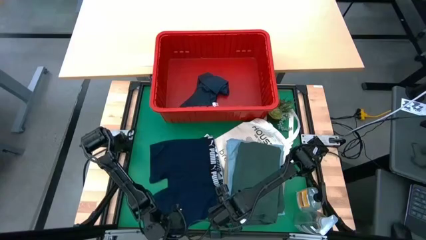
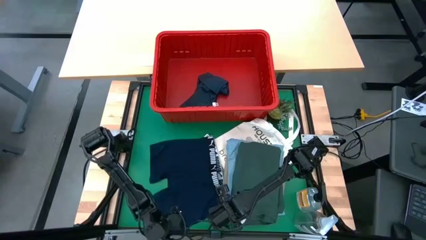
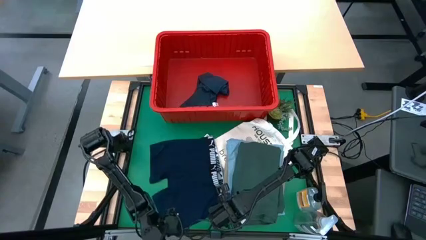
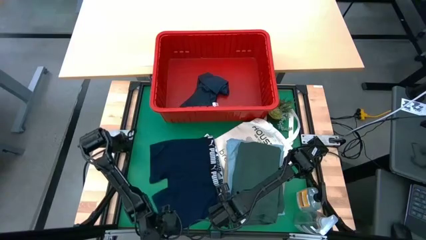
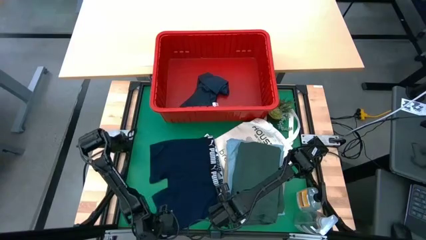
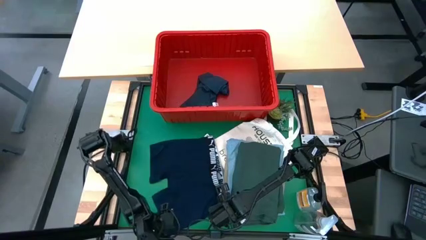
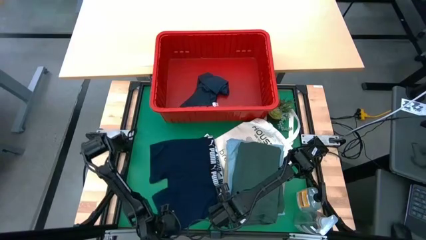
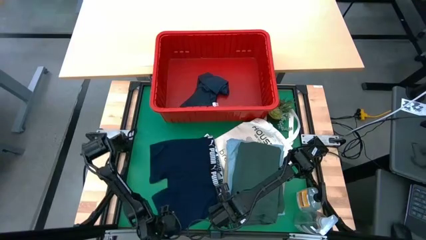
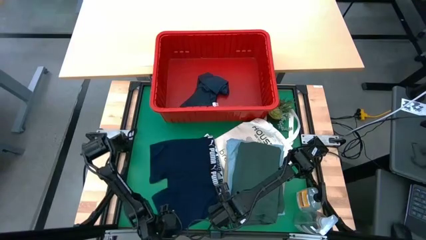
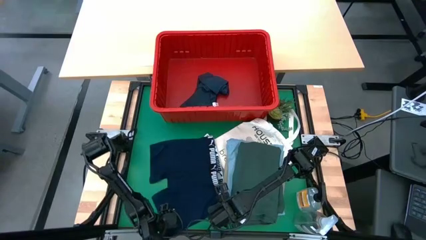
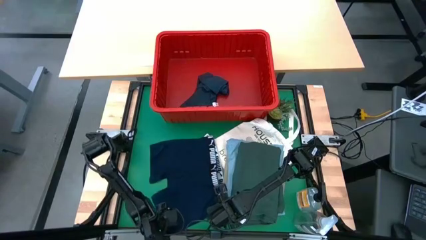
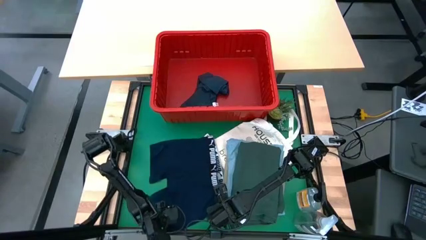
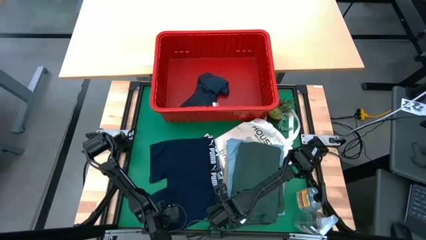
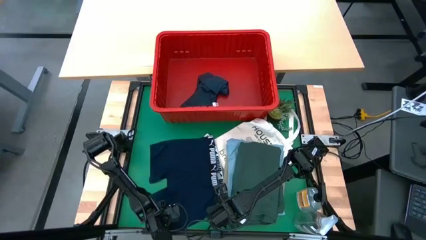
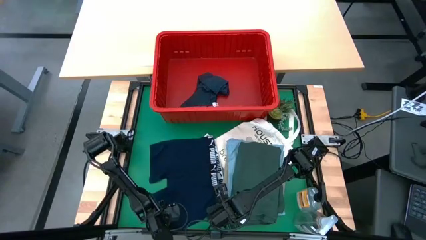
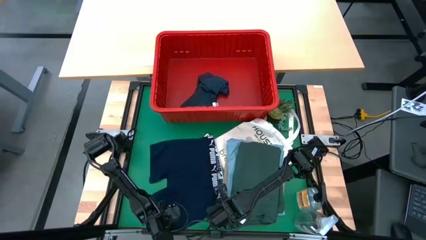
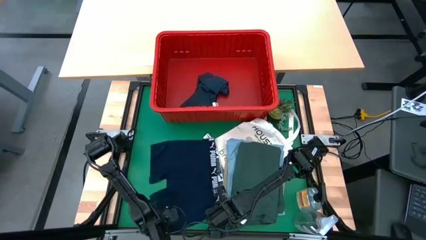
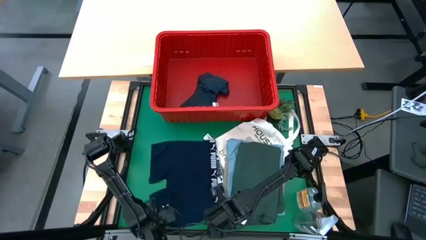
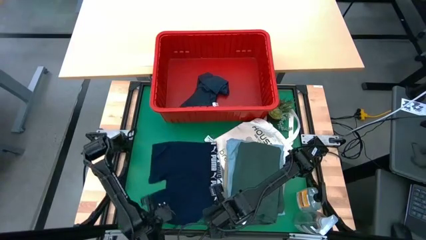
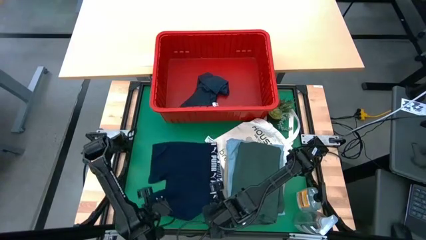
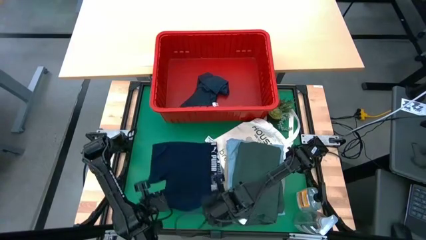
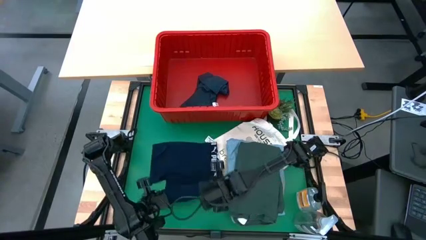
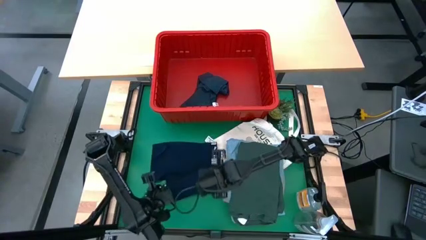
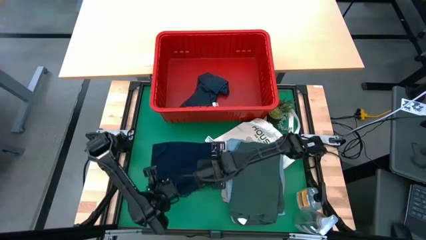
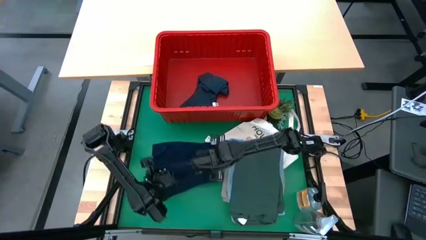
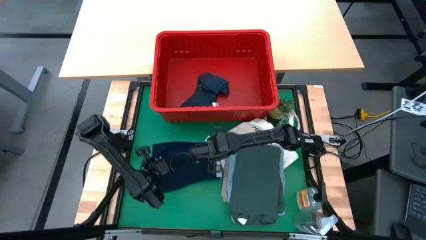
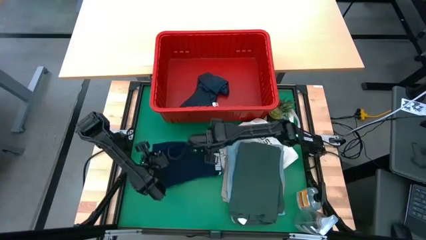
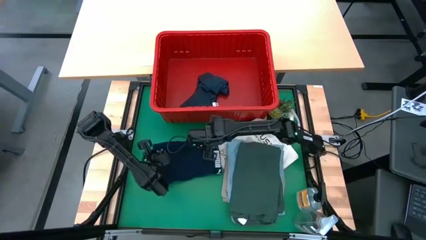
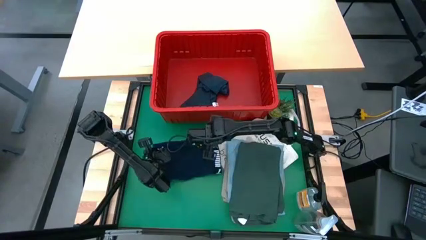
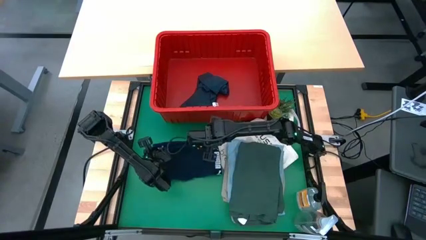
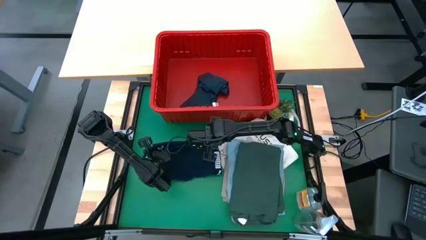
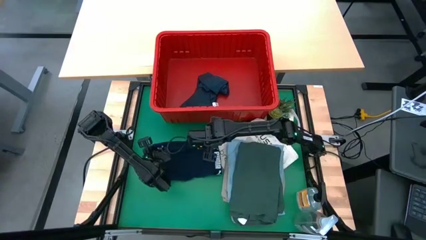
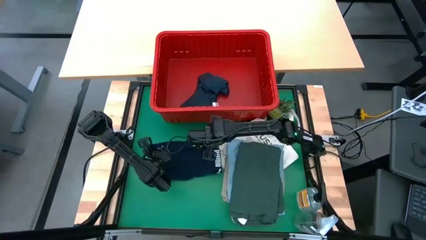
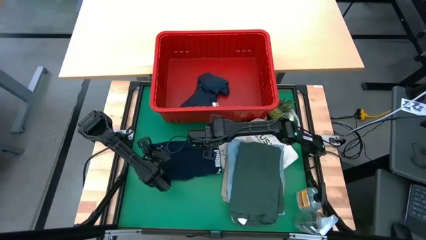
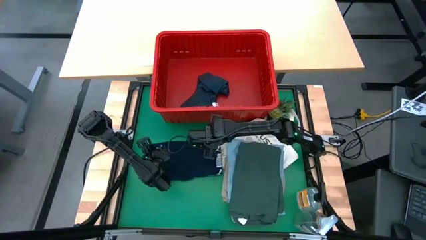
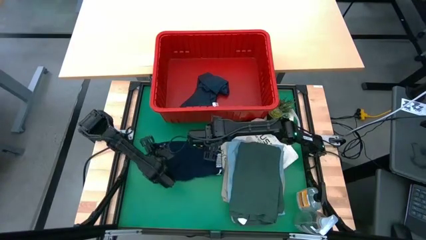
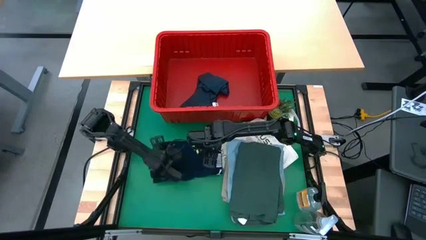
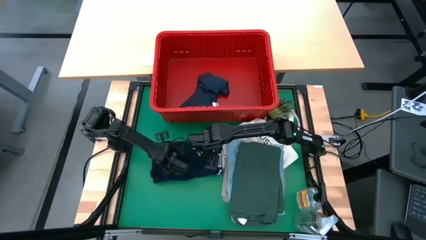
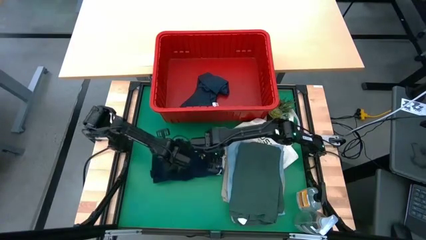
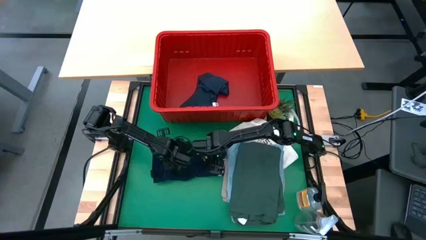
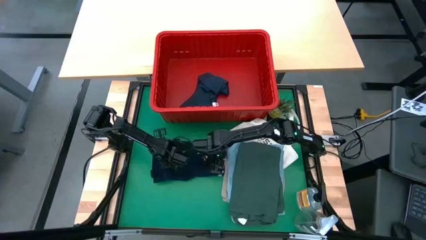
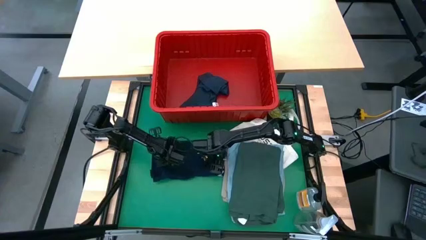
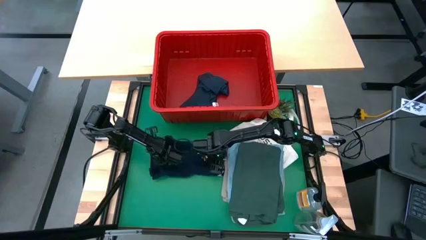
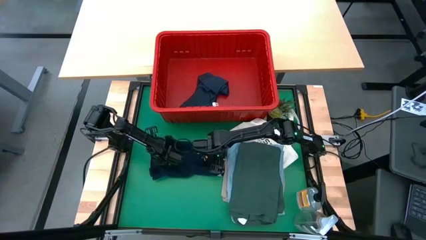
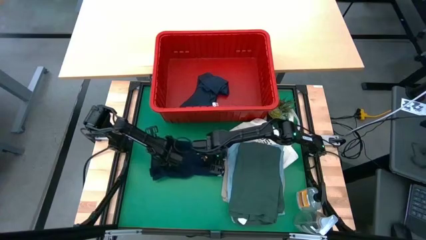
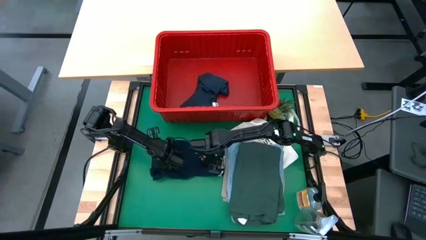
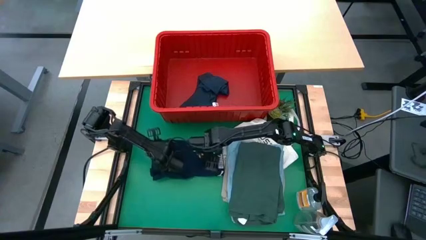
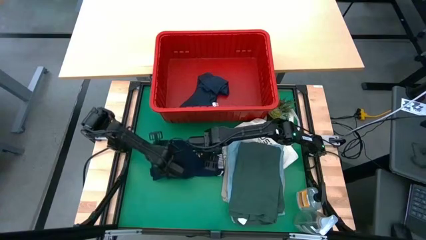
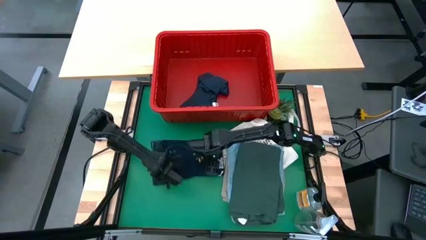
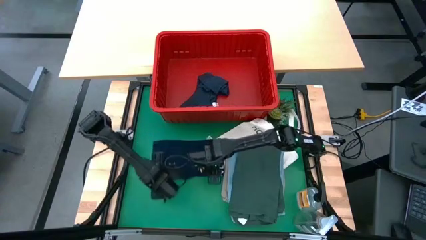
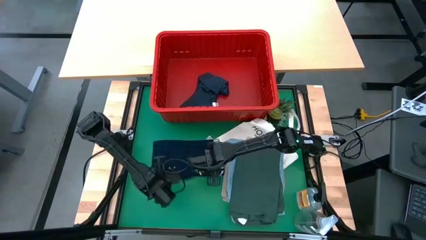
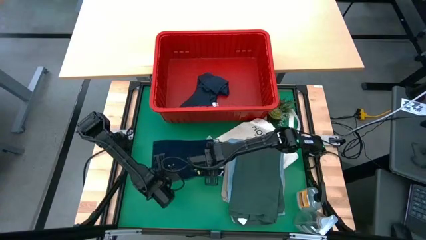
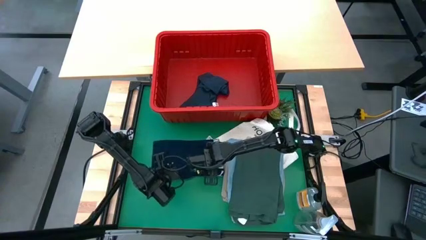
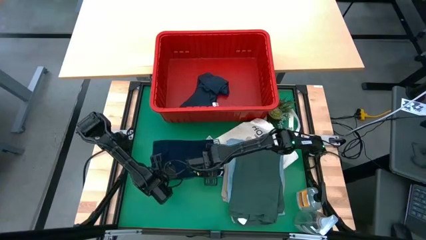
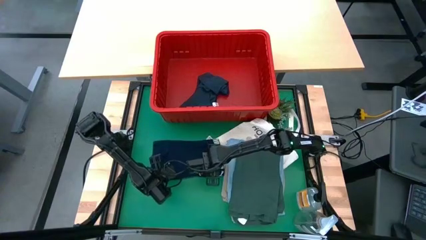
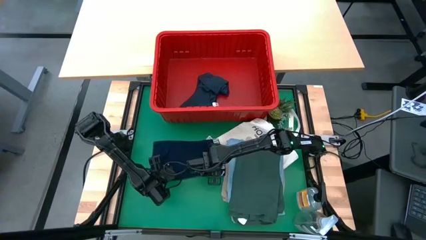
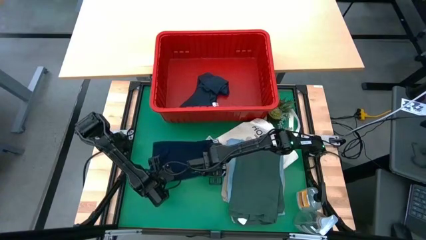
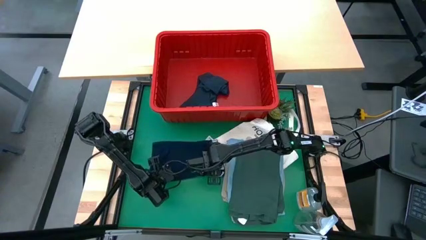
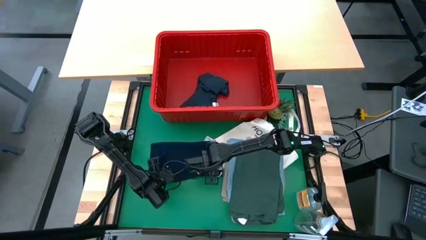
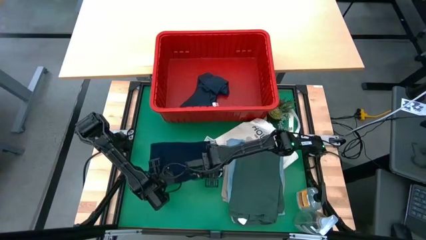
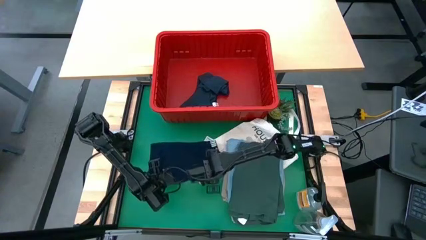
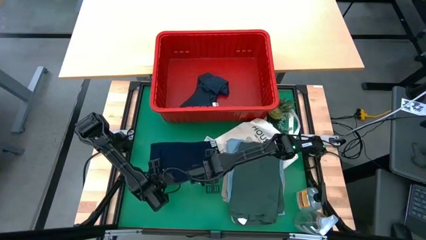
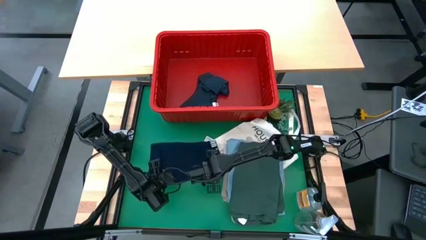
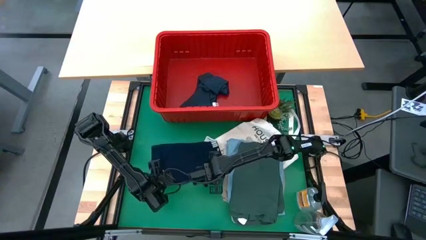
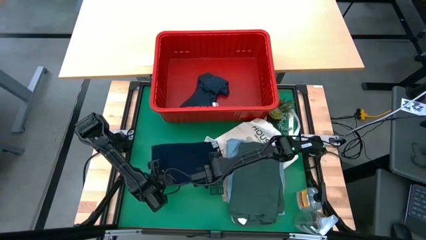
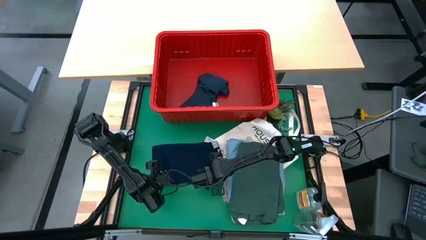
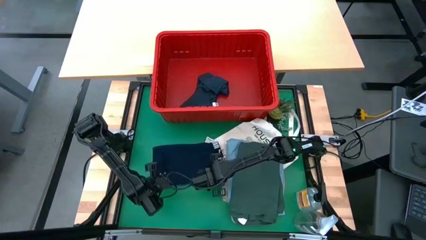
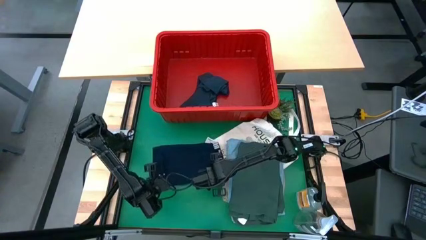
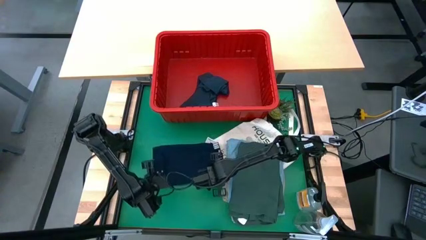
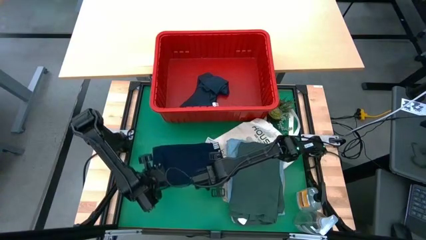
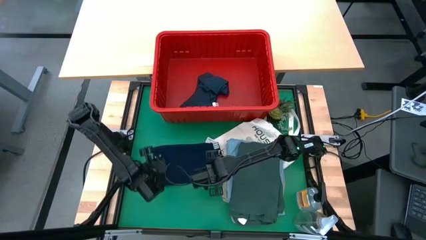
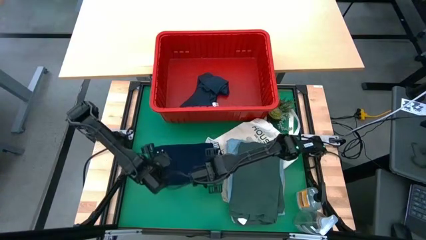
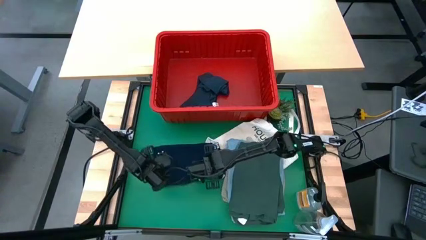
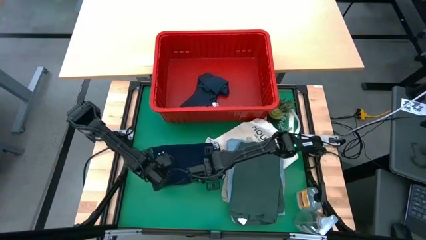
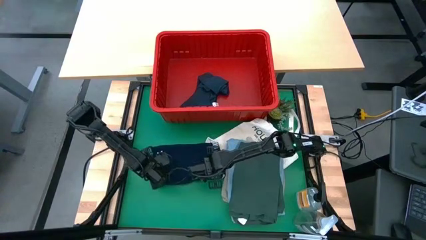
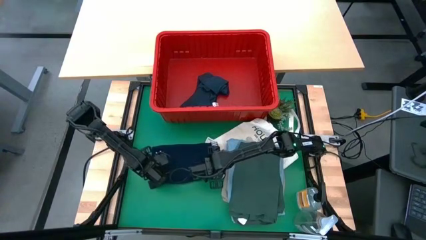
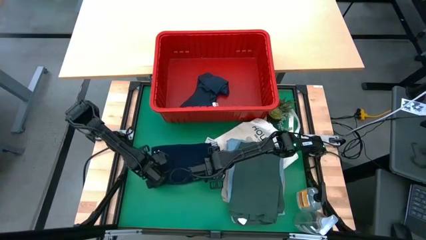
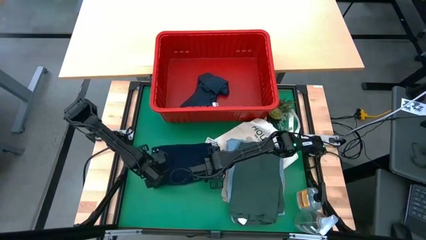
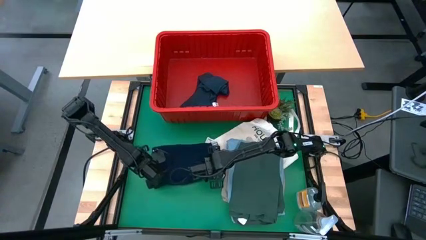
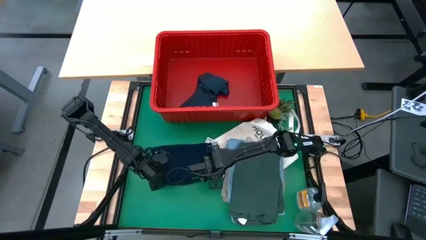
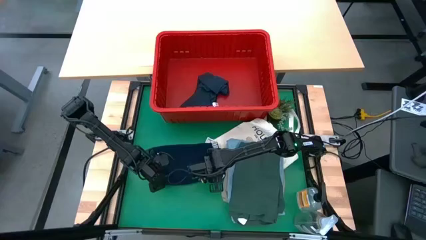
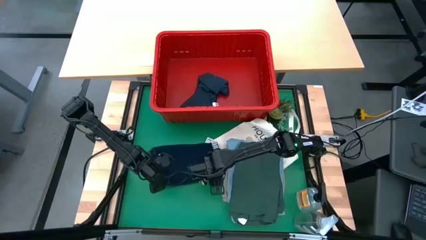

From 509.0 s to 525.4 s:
Task: Fold Laundry from Bin
Fold the dark blue boxer
